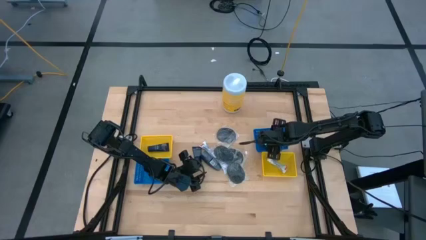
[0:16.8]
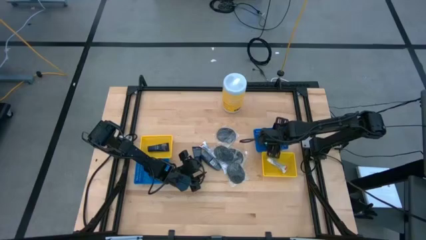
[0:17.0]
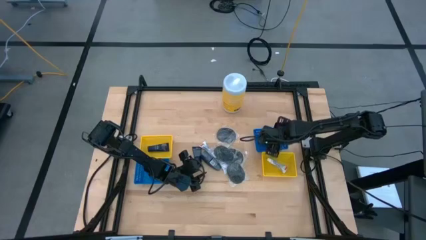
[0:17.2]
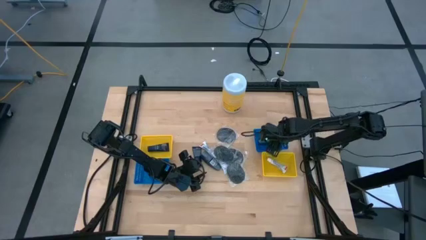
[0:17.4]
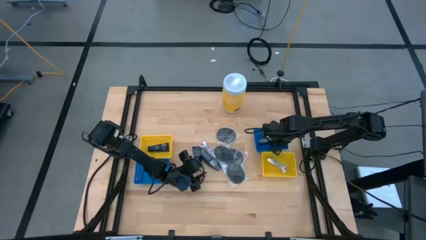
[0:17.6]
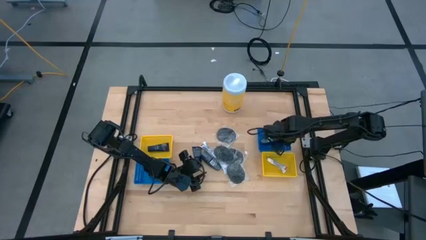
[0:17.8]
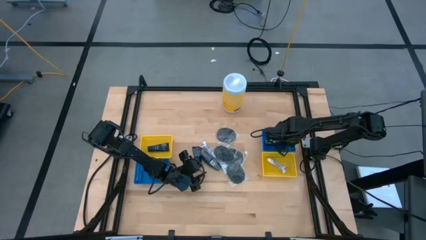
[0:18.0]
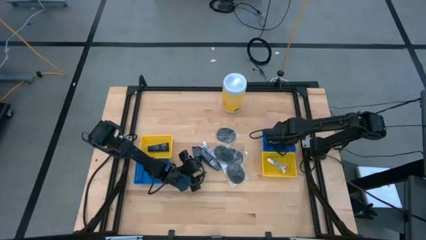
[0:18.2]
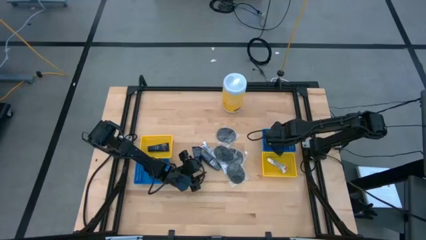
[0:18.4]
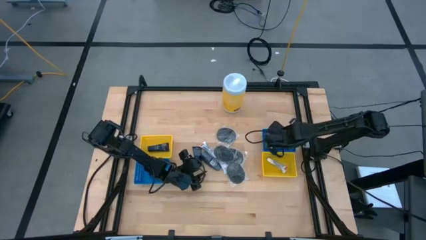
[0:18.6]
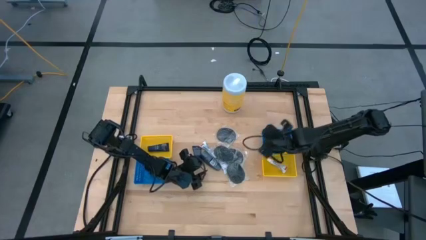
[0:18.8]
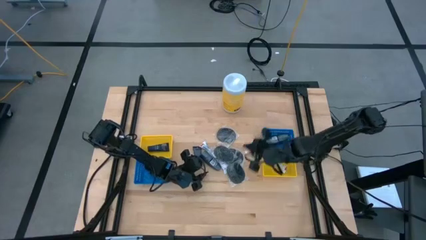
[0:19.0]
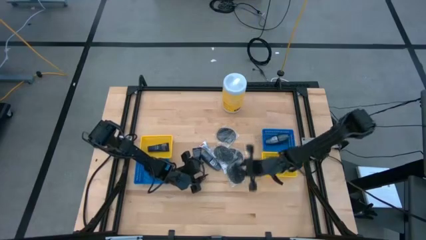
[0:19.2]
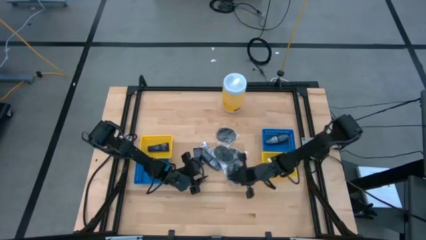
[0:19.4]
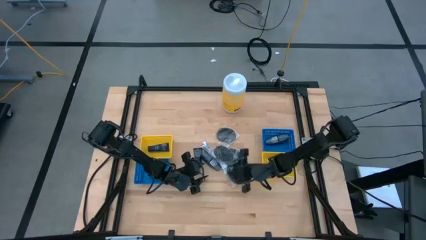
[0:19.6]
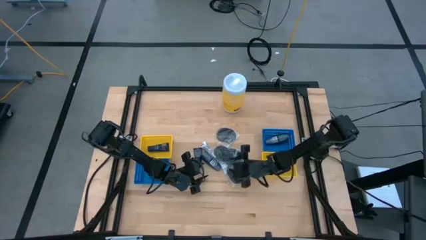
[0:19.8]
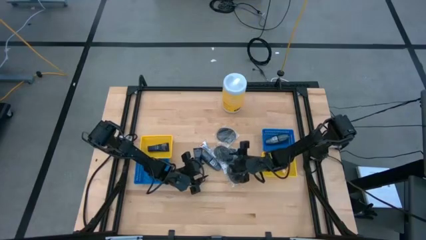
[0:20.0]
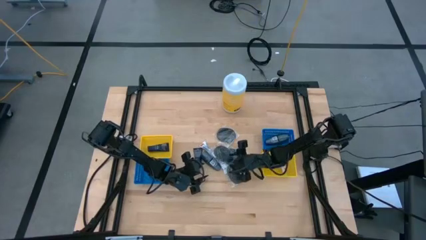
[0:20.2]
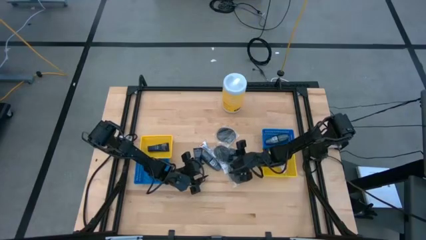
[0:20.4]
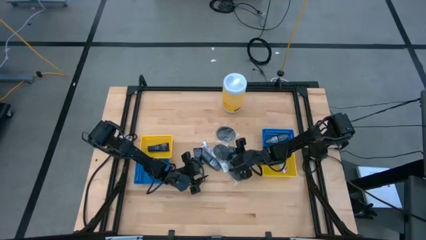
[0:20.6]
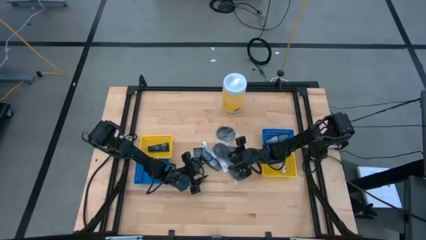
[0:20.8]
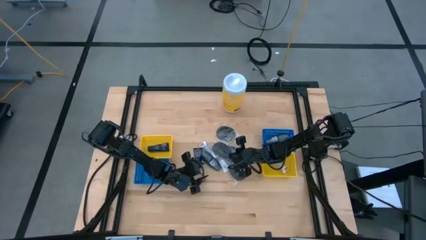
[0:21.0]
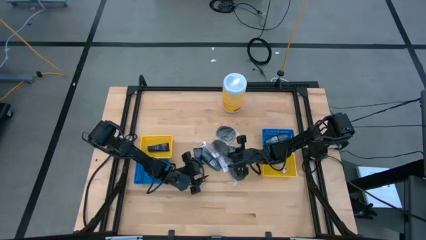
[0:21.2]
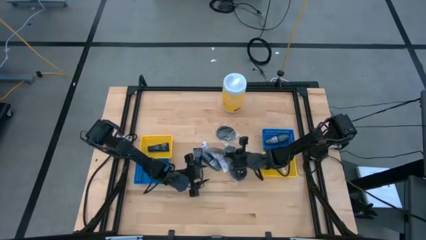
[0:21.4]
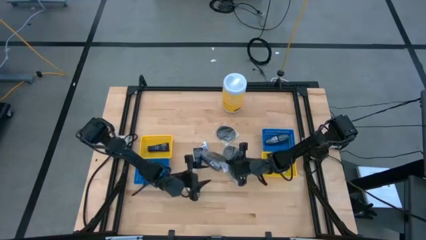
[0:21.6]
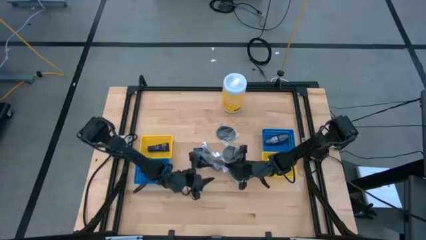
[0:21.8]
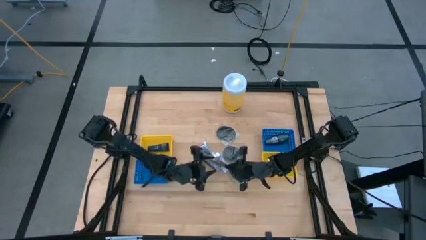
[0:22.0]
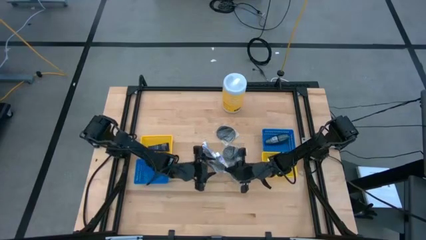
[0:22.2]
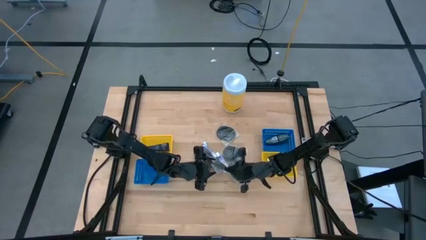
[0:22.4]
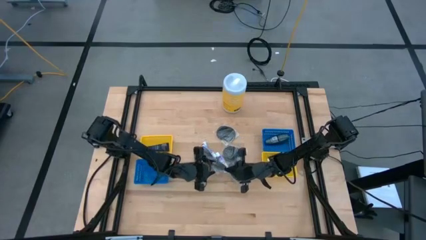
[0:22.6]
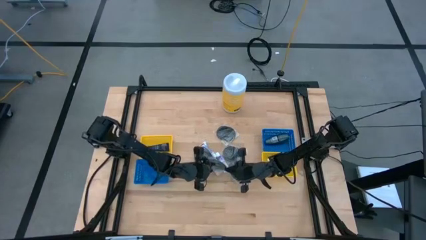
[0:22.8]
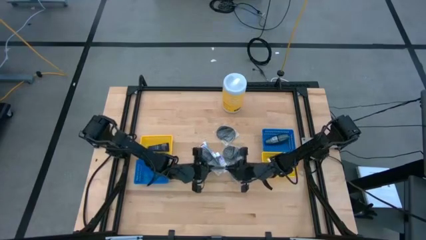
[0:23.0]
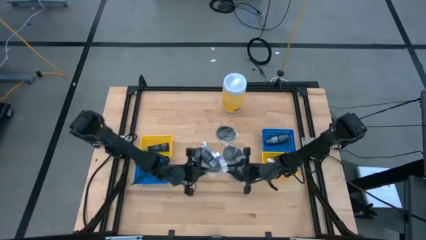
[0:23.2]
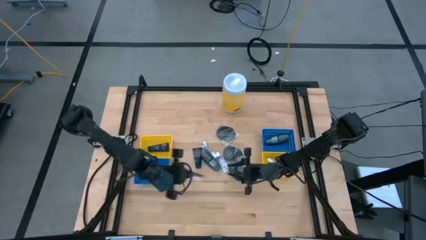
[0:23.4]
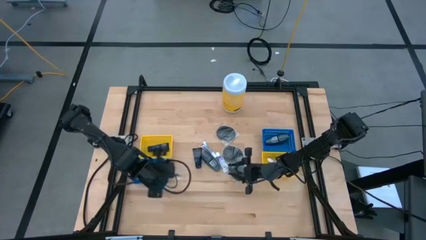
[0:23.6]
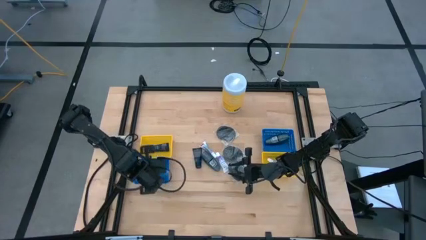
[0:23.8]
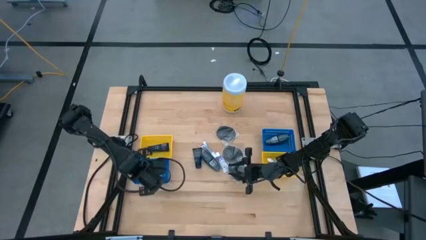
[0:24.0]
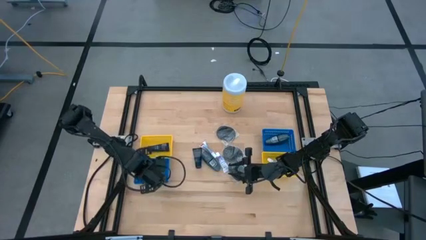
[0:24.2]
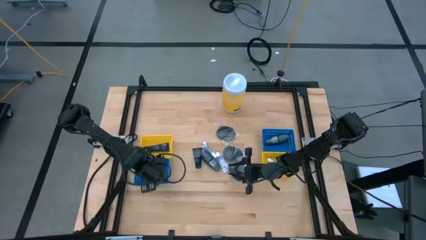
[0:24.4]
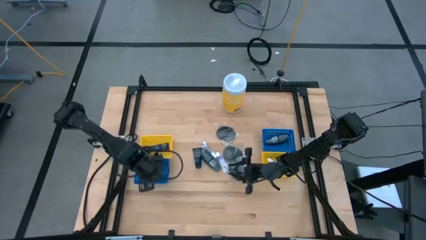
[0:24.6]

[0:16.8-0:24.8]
Task: Pick & Place Travel size toiletries
Put the black hairbrush into the left blue bin

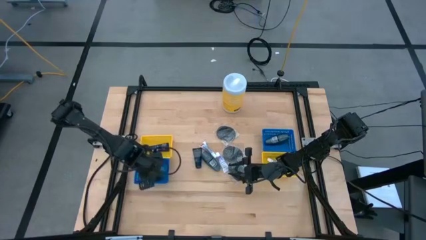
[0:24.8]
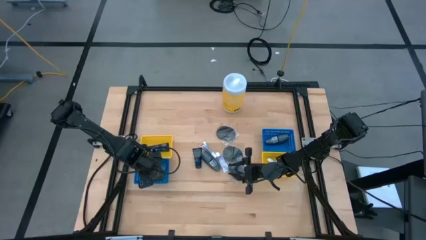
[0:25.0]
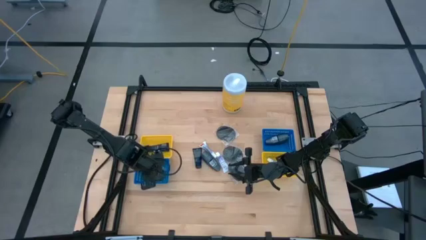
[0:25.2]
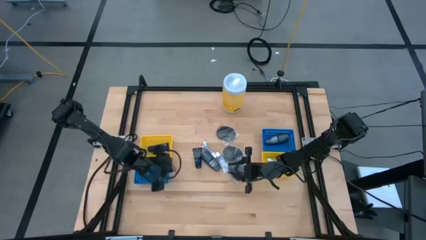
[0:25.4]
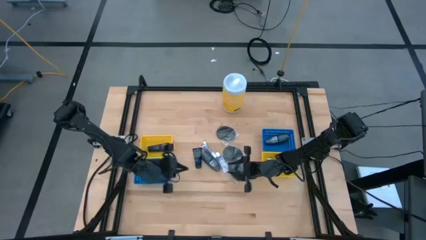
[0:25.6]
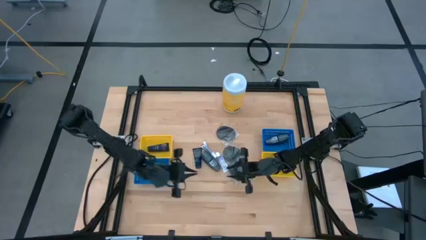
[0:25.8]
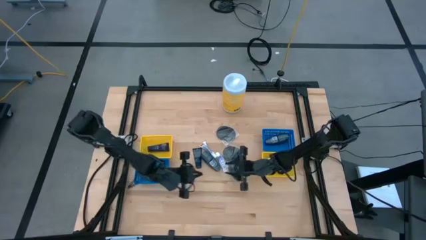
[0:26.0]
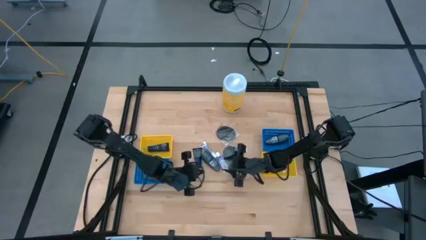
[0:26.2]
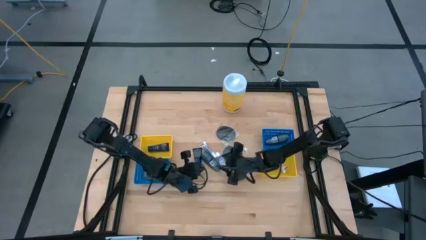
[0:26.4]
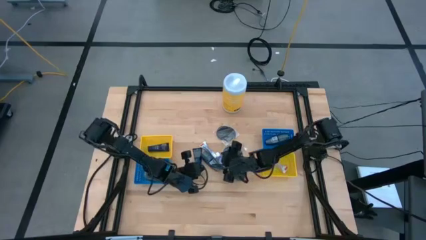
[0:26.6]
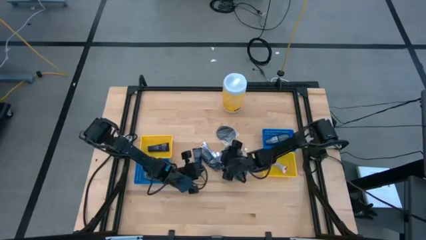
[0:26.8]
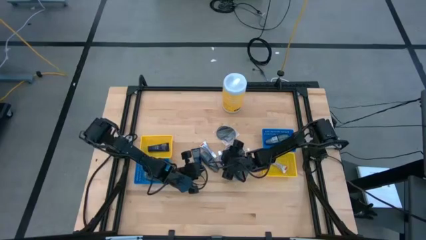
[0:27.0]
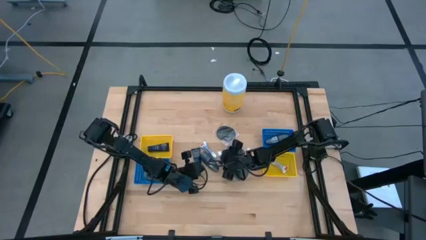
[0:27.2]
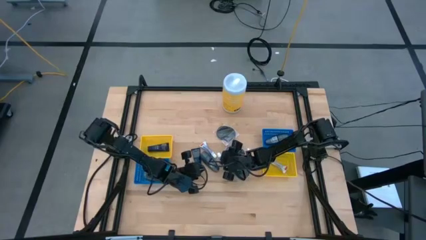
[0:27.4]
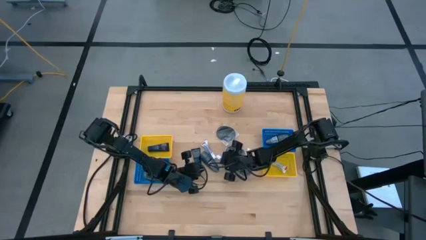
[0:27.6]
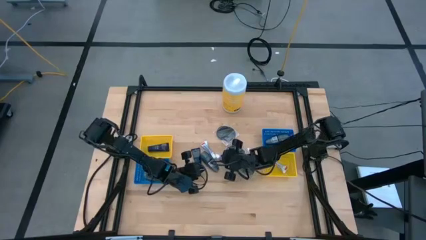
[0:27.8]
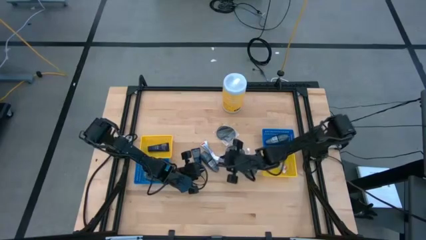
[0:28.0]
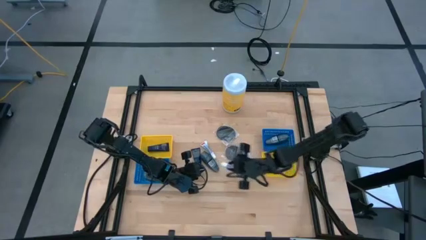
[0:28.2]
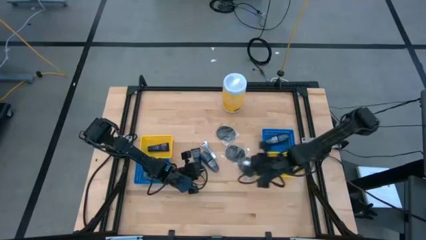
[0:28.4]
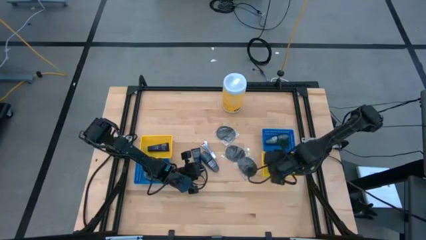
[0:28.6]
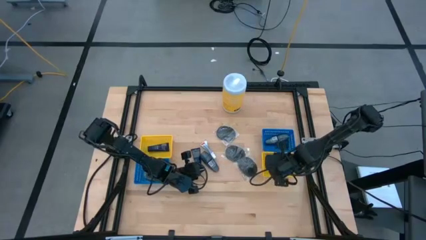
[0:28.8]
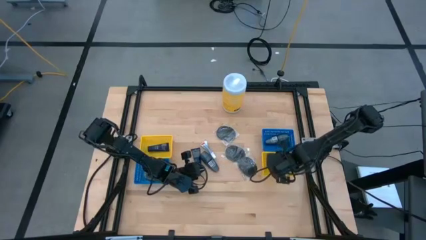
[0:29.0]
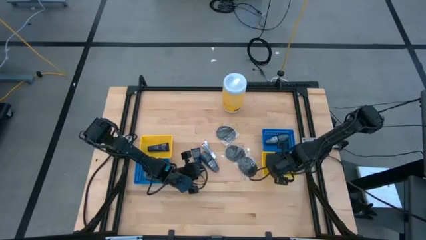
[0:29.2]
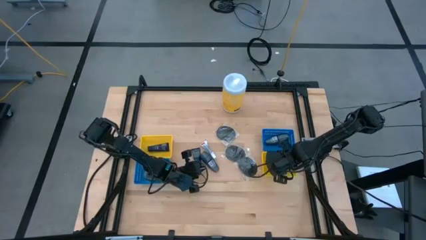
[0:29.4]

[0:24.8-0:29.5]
Put the white toothpaste into the right yellow bin

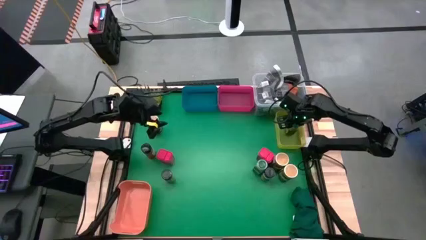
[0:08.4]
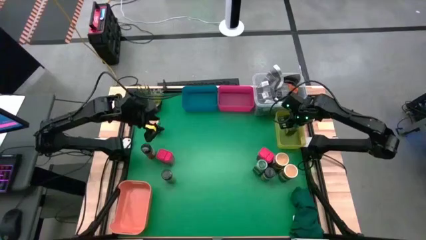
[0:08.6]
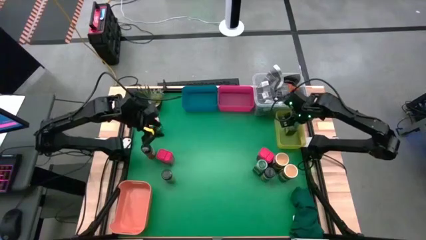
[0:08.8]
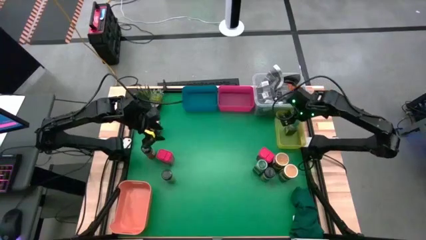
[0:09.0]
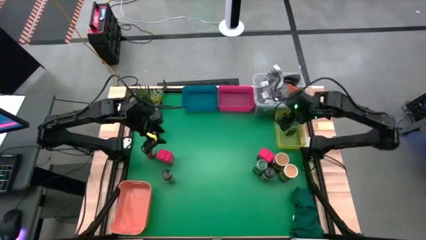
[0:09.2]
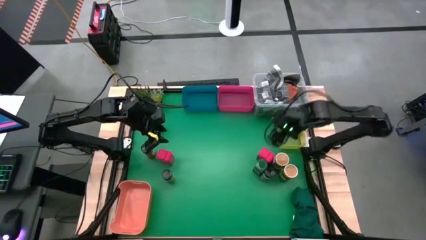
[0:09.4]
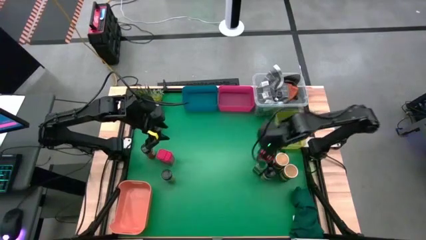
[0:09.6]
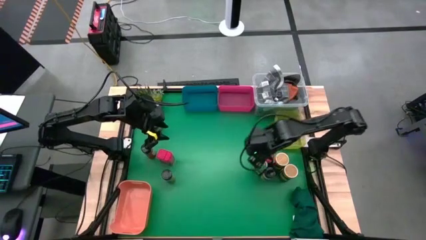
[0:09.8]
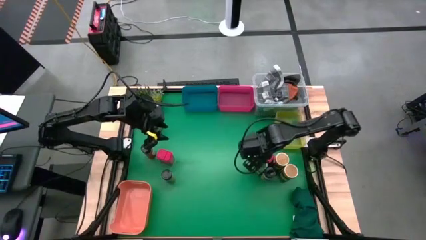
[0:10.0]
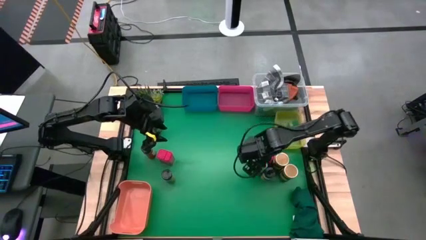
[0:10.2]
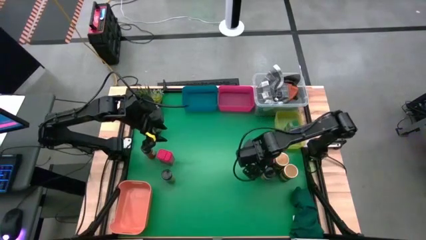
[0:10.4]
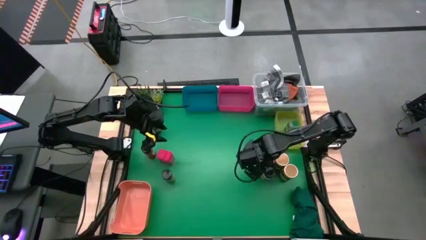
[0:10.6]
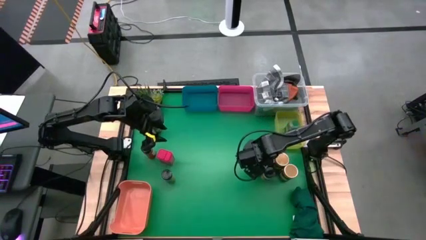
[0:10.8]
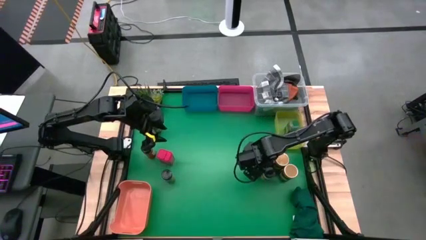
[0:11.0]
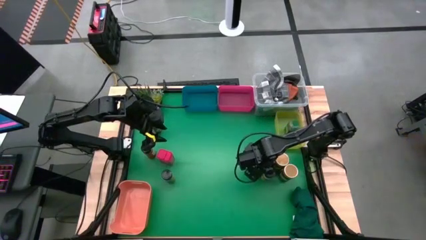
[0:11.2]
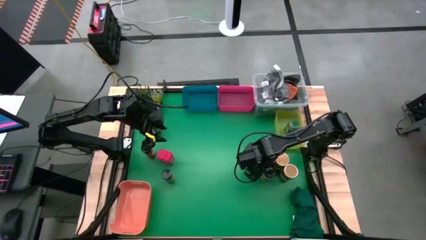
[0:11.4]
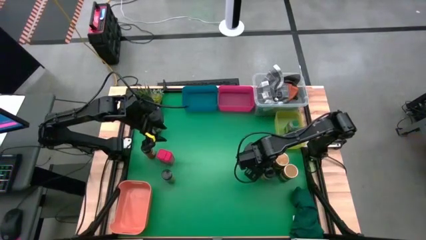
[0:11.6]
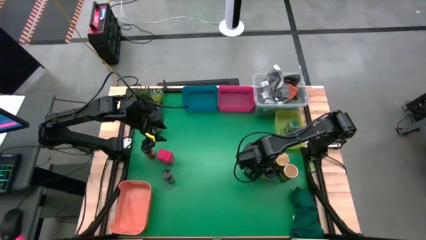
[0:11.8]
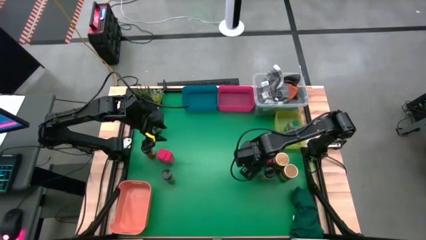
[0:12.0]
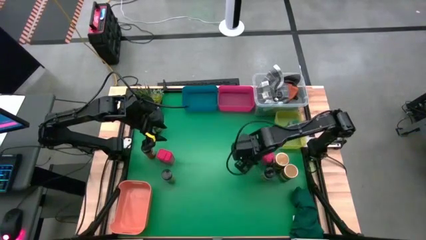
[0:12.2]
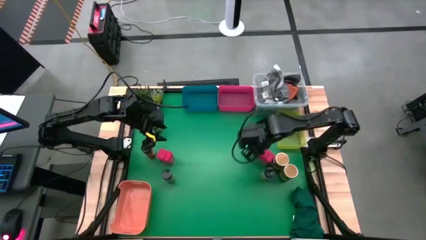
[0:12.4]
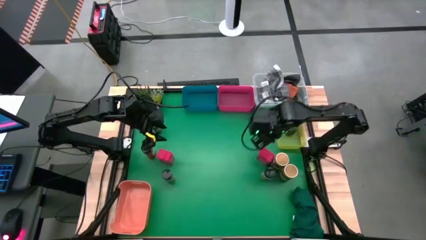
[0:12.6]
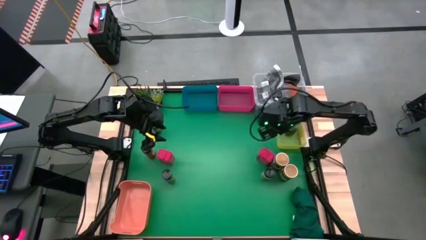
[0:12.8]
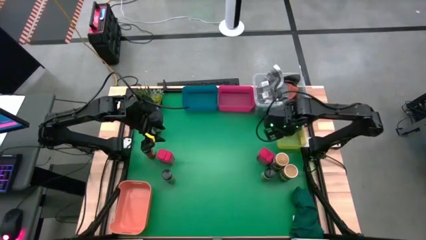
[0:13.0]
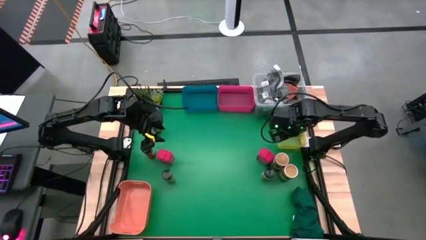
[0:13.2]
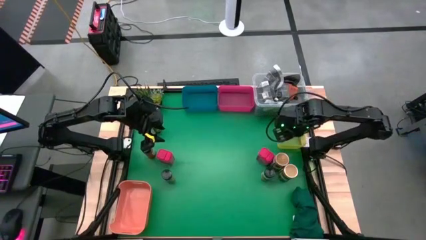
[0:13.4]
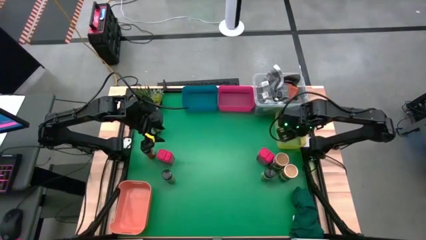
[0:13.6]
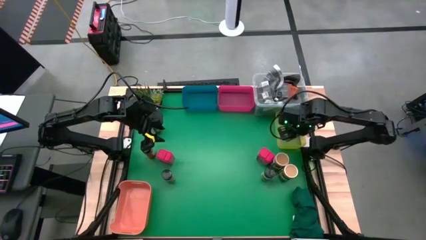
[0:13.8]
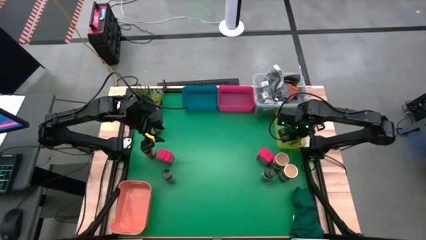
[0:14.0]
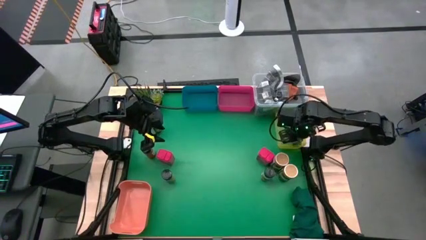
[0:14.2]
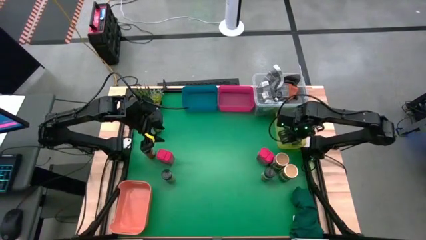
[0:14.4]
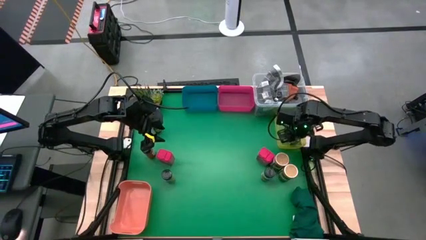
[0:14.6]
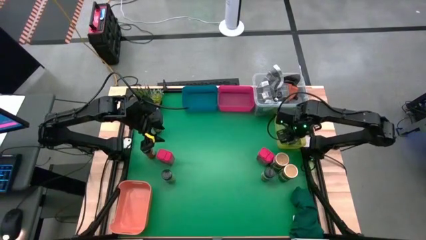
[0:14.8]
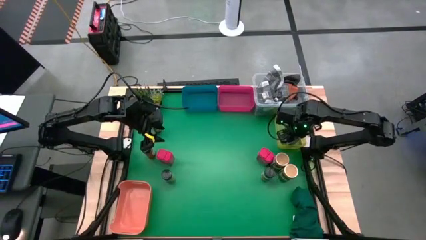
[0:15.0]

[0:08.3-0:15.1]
Task: Sort spices by type
Put the dark green spice bottle into the yellow bin
